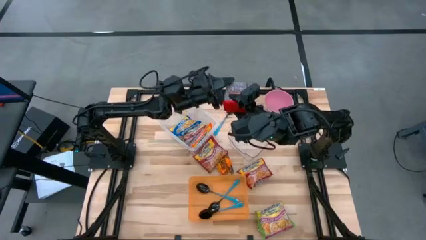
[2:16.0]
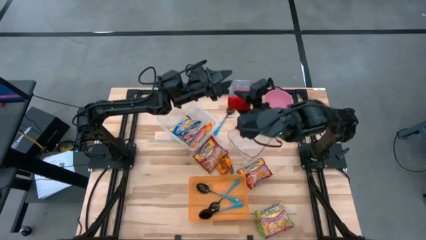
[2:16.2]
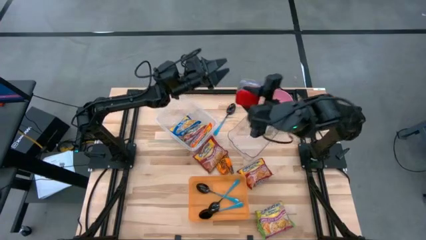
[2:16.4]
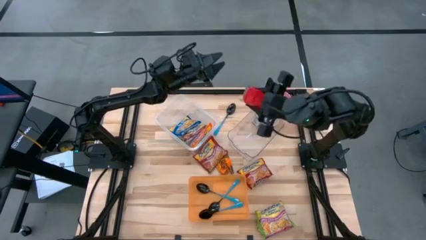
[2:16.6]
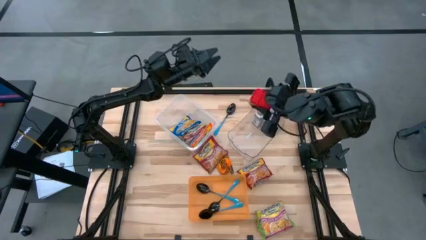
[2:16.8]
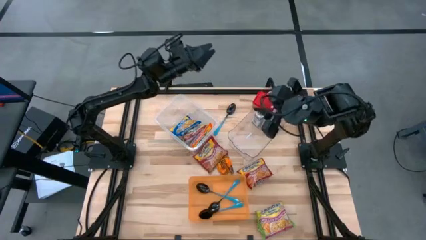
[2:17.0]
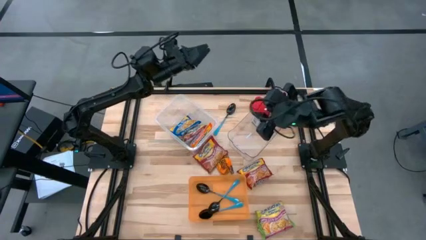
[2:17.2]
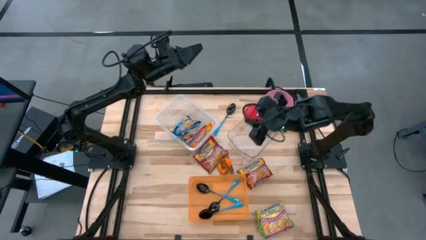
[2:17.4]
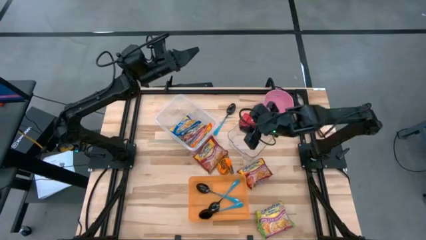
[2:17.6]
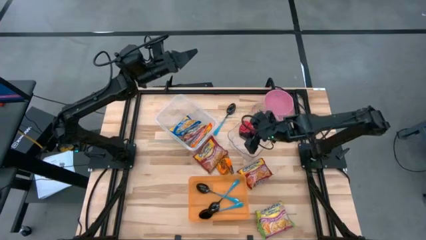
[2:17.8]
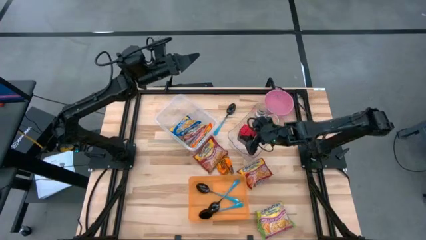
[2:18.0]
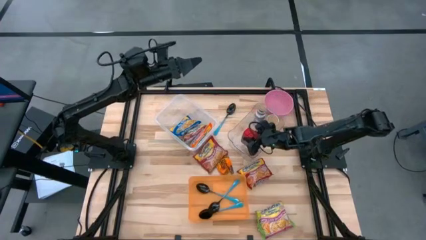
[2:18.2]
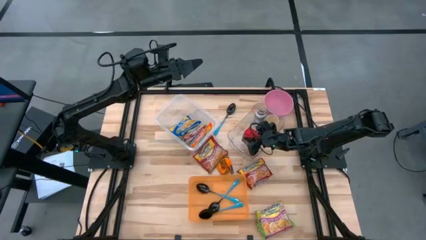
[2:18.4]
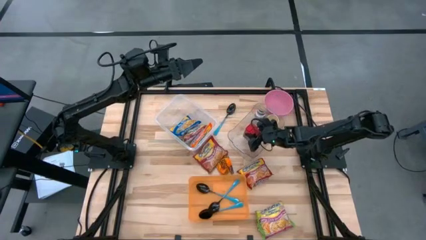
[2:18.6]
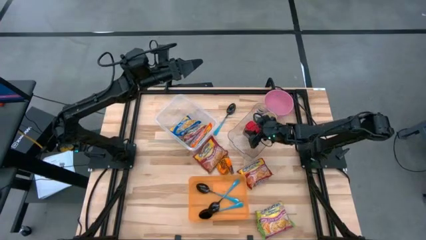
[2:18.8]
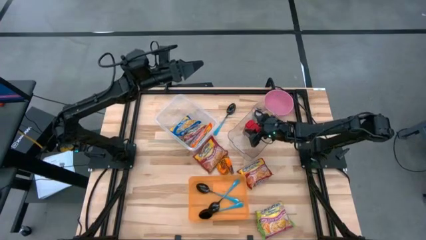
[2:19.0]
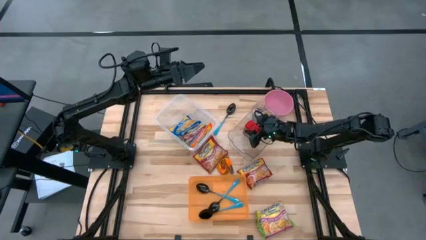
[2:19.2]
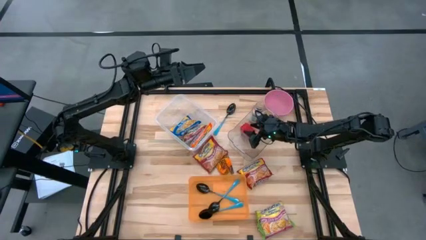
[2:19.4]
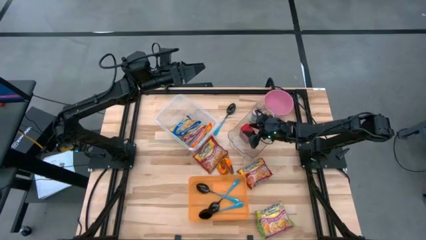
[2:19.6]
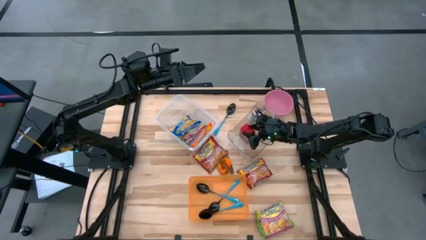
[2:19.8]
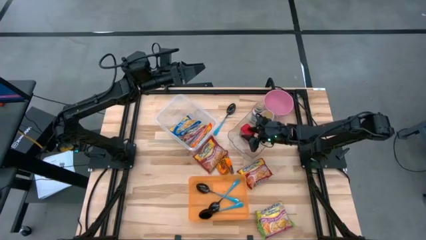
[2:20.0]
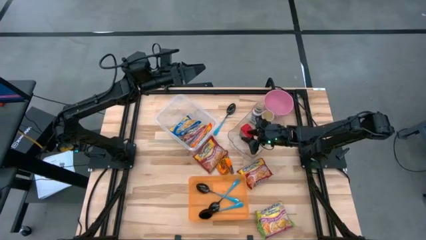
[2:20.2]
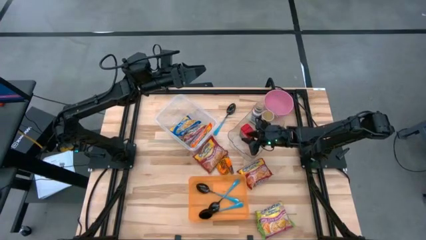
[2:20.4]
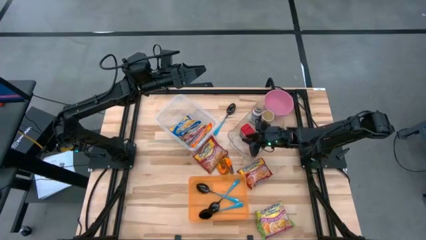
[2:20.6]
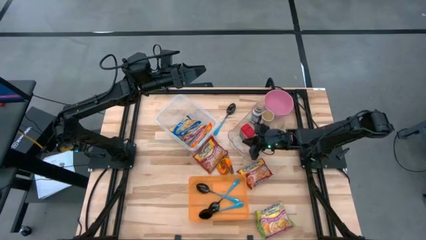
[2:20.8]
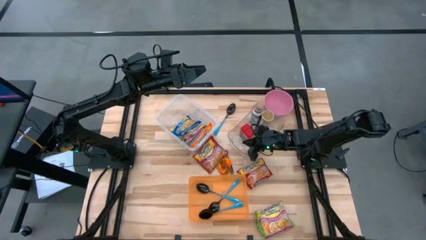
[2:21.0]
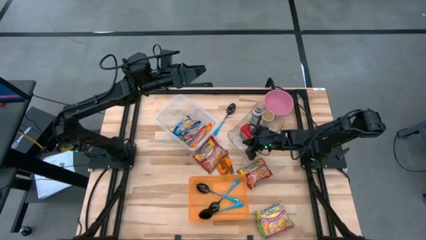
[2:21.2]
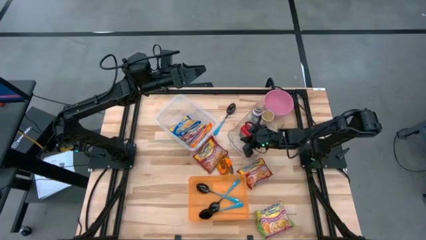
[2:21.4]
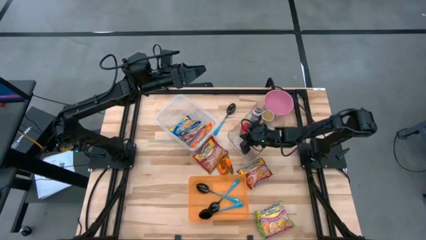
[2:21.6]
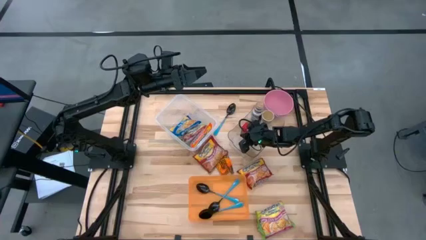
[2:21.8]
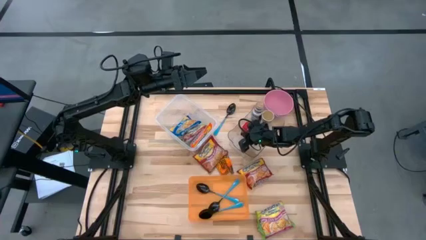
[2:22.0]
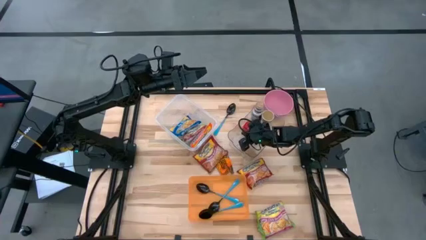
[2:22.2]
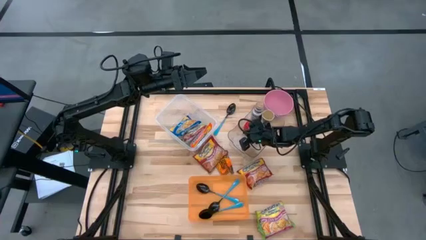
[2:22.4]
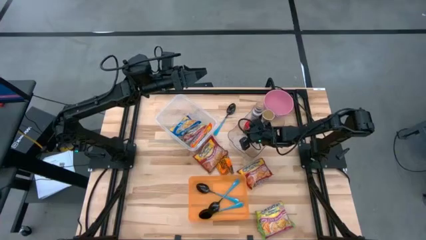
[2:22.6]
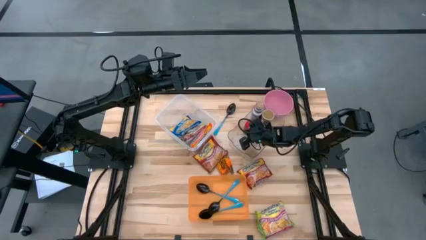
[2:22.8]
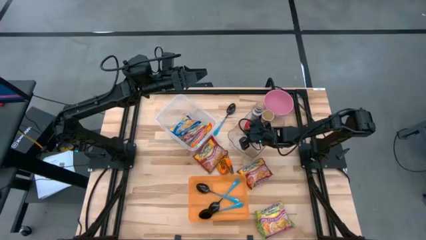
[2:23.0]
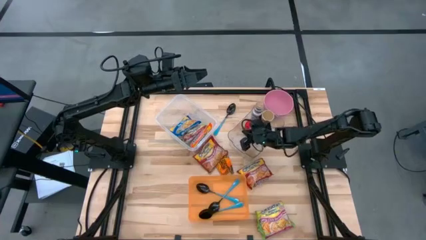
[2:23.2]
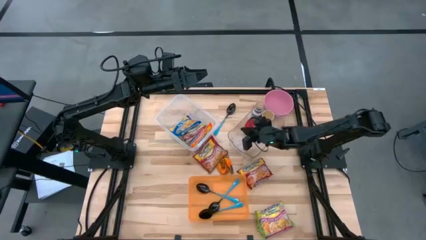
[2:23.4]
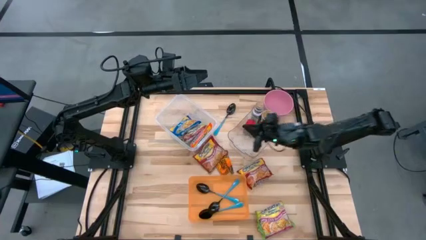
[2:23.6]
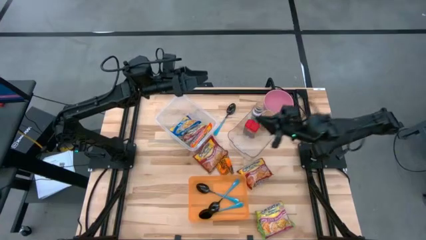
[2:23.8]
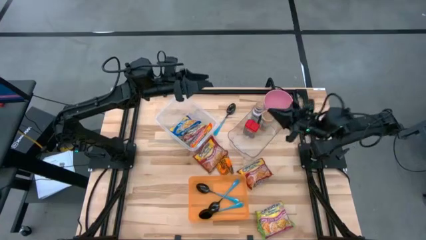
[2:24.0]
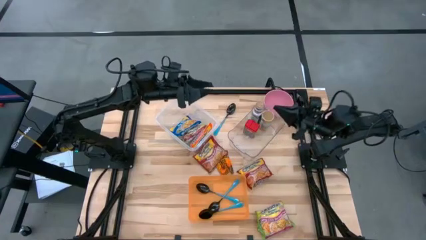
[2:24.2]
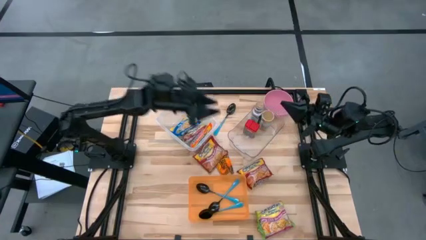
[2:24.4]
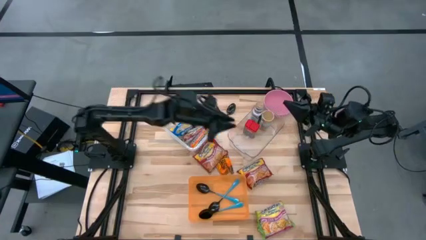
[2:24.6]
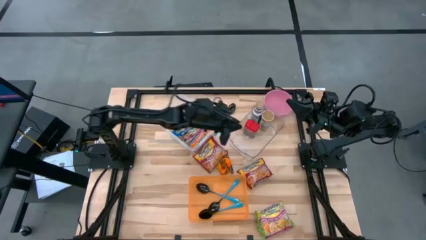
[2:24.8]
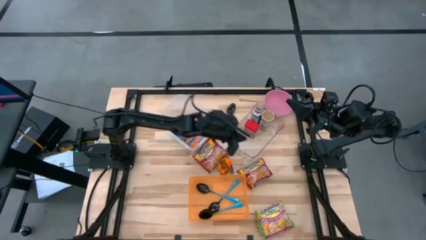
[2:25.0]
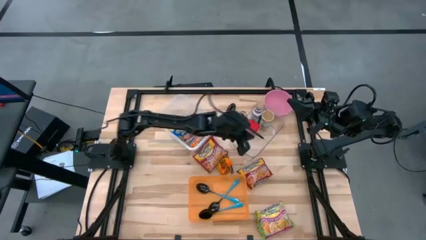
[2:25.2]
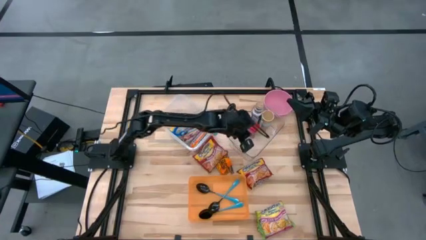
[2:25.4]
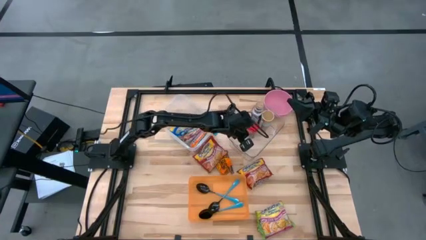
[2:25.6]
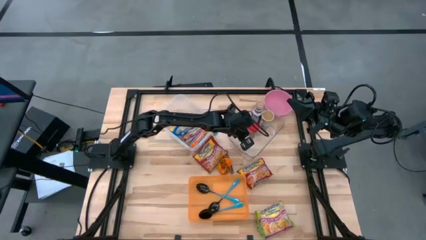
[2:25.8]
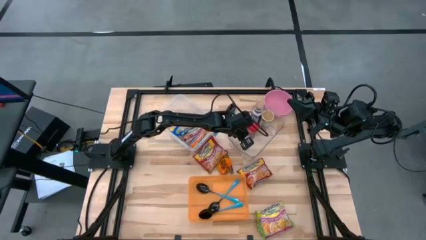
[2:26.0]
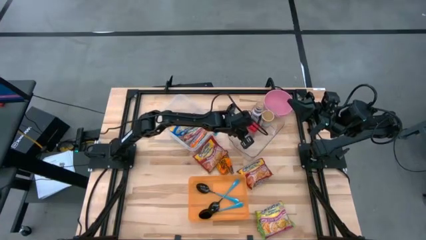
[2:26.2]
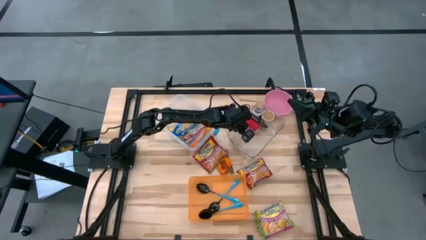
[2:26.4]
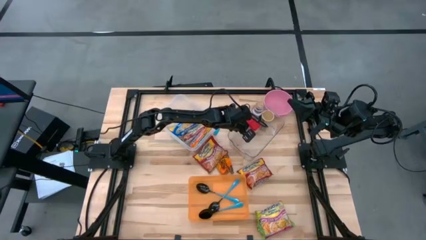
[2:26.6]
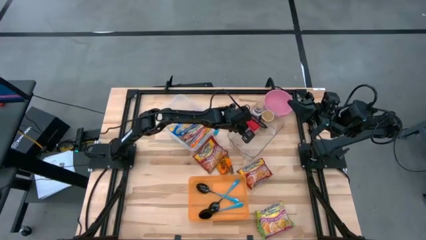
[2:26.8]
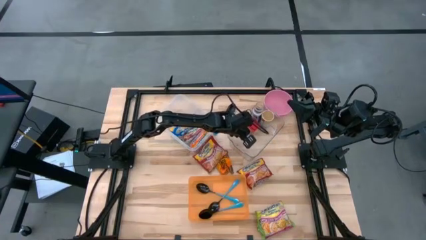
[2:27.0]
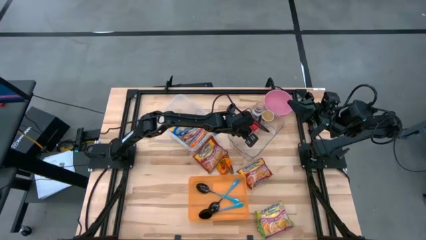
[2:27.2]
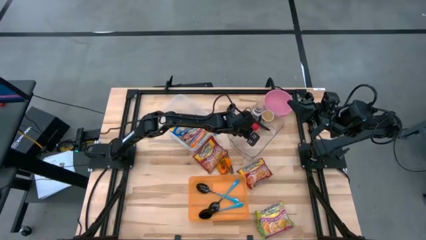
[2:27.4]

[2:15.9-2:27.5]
Task: Pick & Place Food Item
Put the red seasoning can into the transparent bin

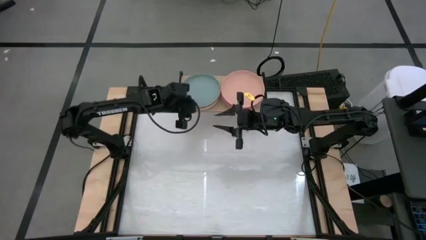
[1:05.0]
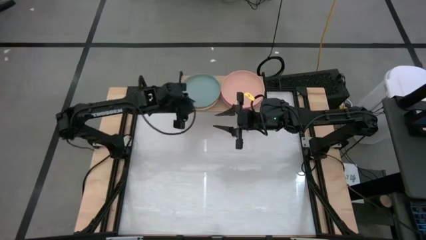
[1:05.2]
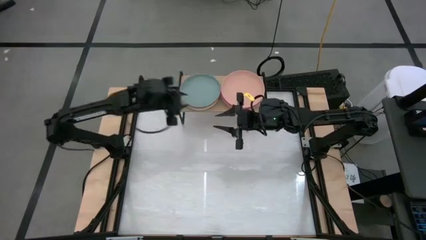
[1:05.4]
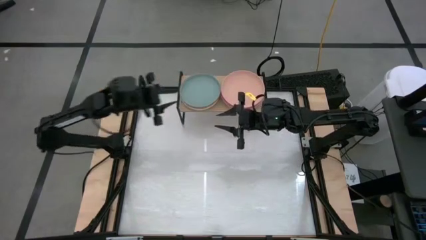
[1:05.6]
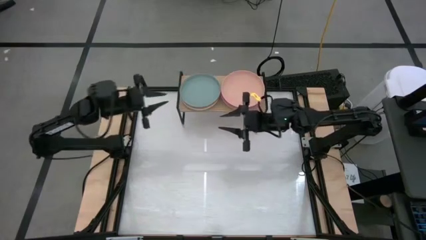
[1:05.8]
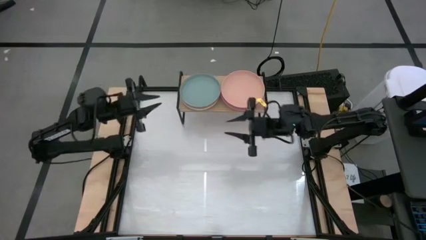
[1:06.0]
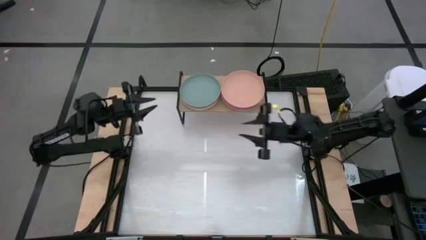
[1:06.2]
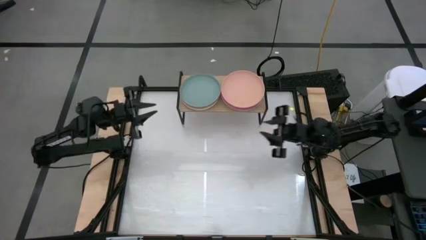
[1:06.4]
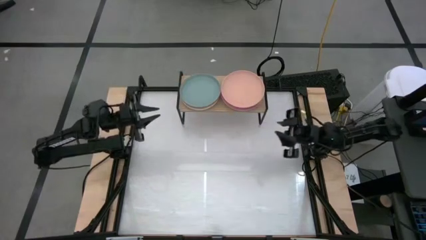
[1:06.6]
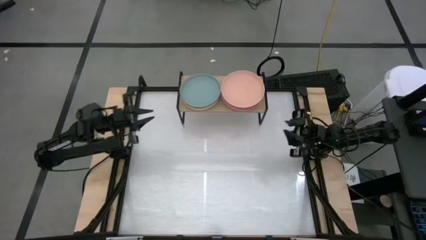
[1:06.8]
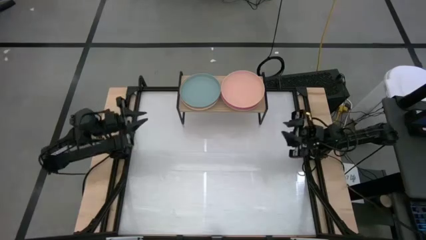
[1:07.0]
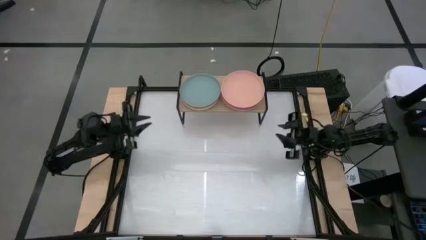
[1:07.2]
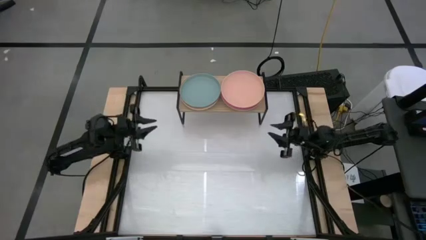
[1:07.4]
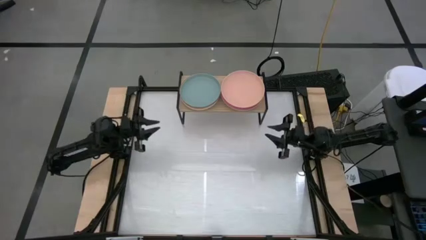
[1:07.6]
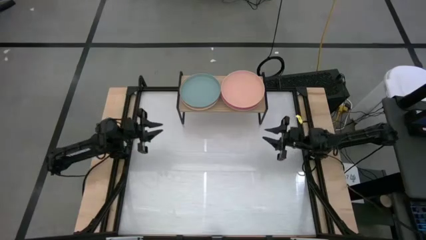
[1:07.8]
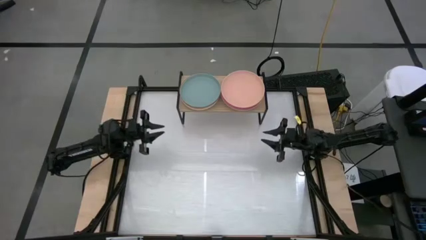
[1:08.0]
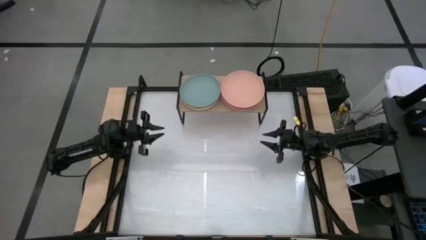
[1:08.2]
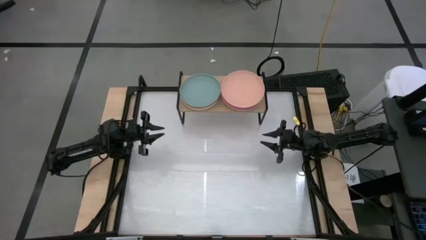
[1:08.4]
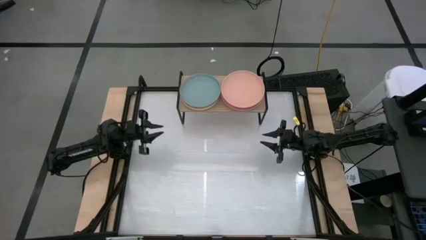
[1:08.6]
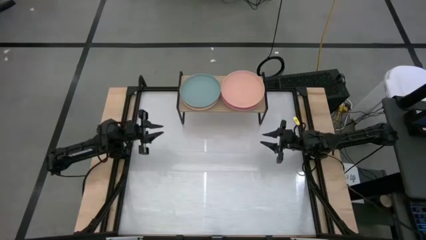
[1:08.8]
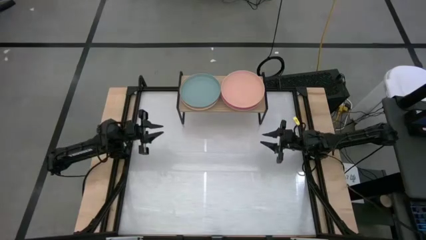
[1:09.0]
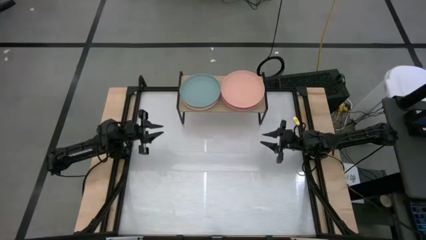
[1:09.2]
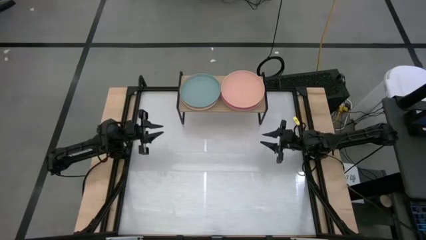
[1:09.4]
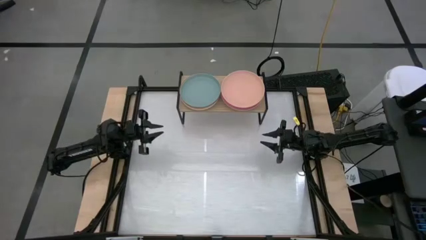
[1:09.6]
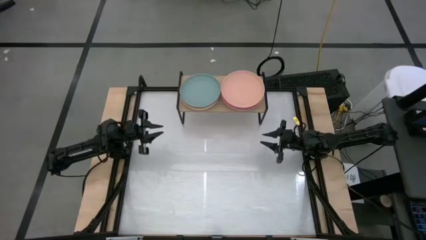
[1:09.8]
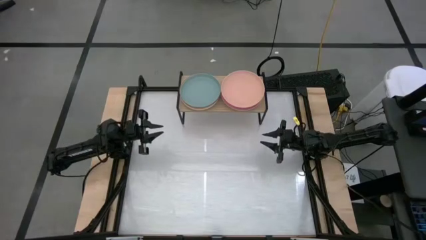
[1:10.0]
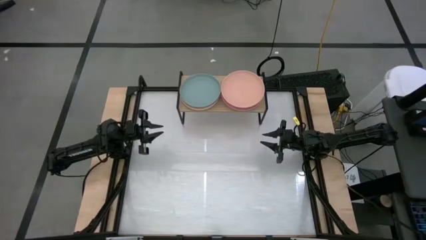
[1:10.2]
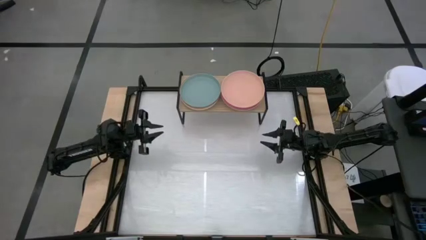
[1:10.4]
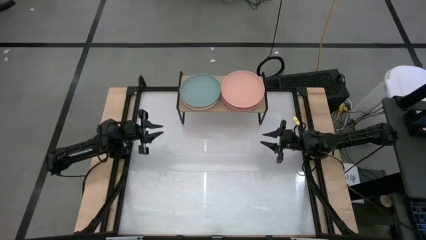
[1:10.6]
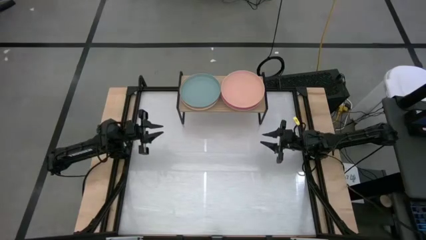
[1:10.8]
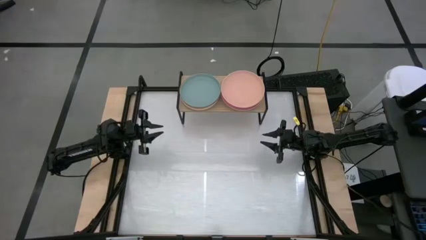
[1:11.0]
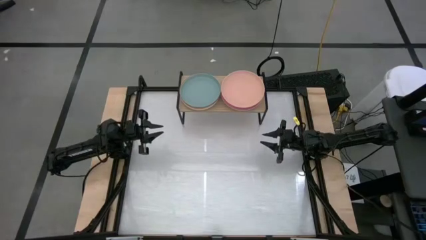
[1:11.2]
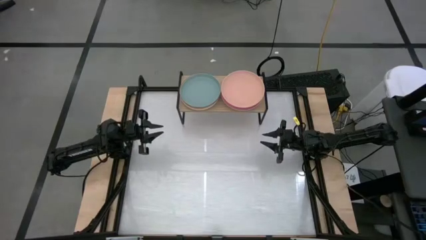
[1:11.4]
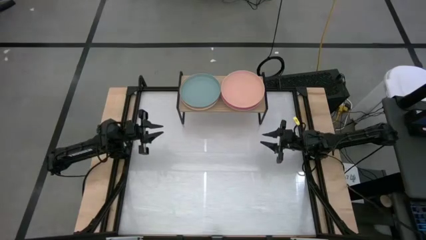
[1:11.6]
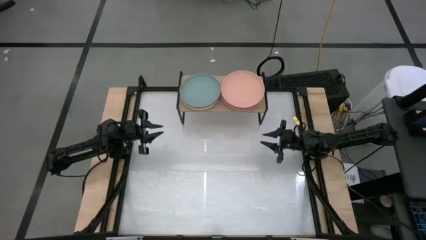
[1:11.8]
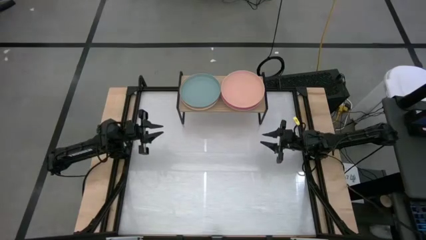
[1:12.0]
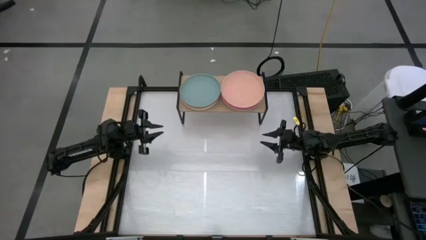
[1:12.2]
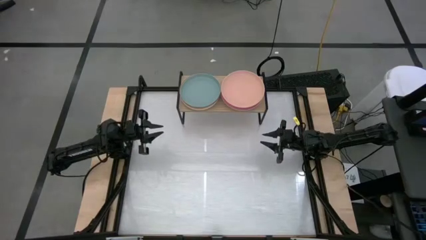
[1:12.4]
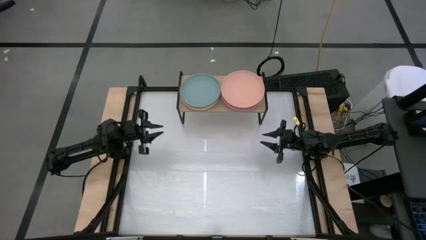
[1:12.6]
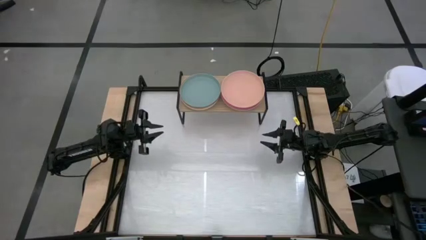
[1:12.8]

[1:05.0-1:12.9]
Task: Place and stack plates onto a shelf
Return to Home Position
